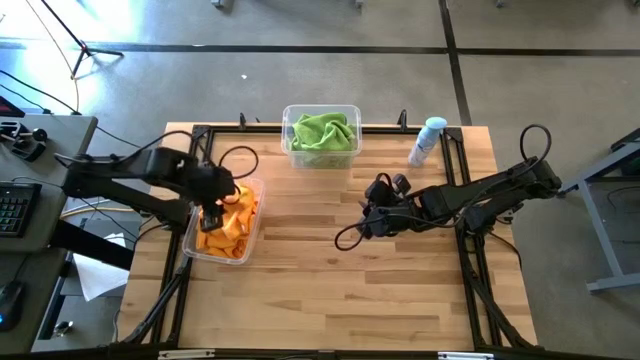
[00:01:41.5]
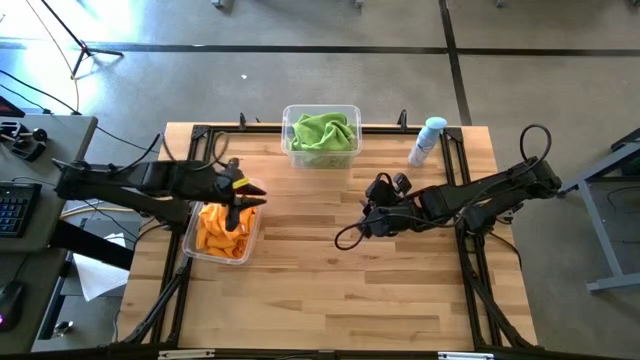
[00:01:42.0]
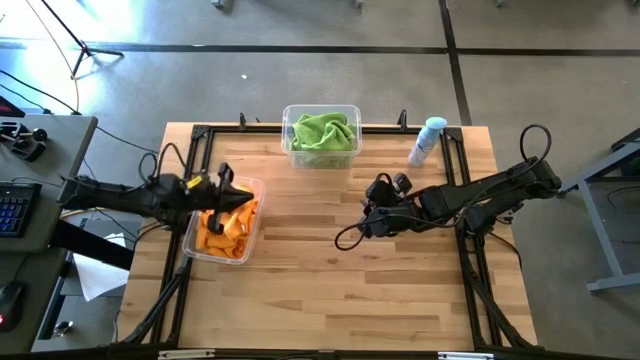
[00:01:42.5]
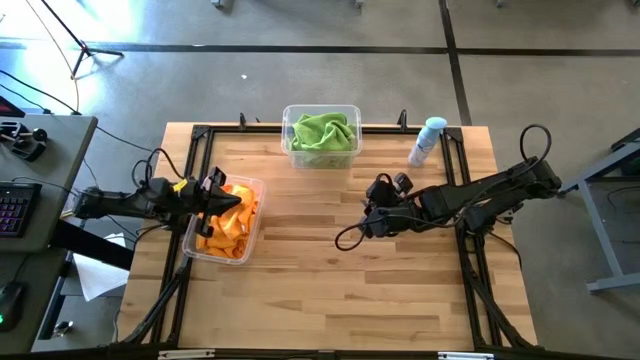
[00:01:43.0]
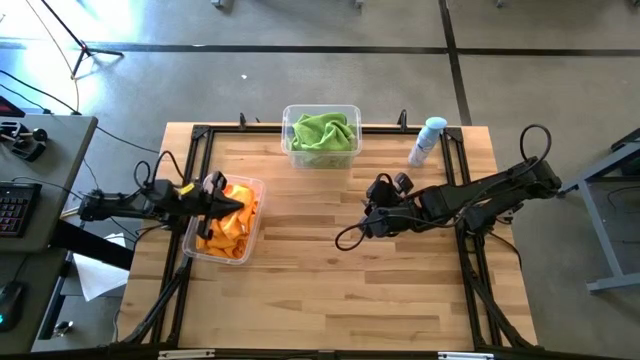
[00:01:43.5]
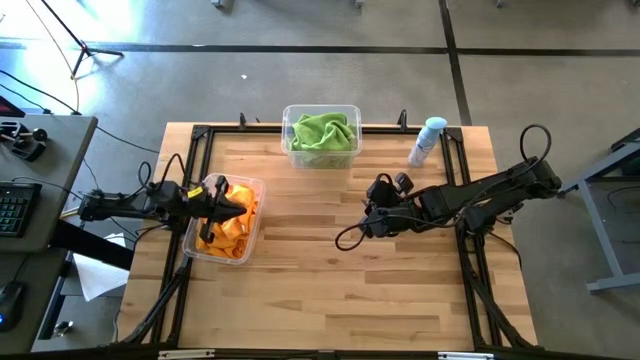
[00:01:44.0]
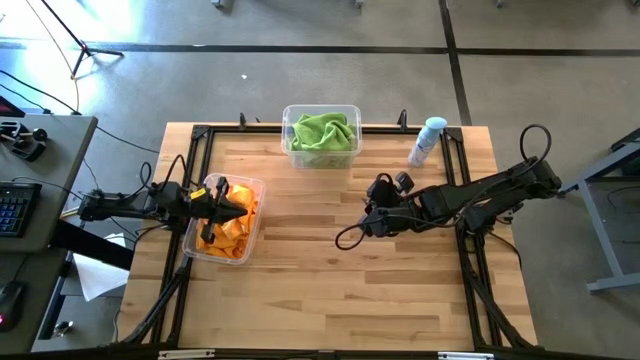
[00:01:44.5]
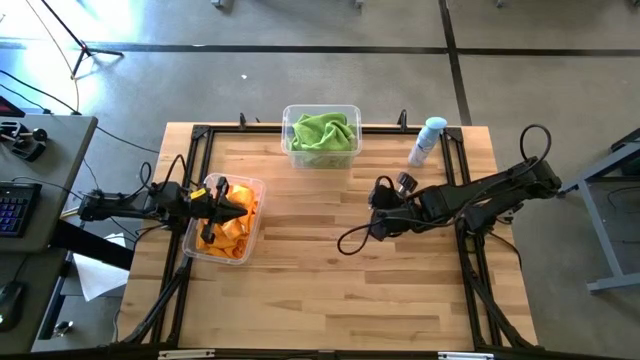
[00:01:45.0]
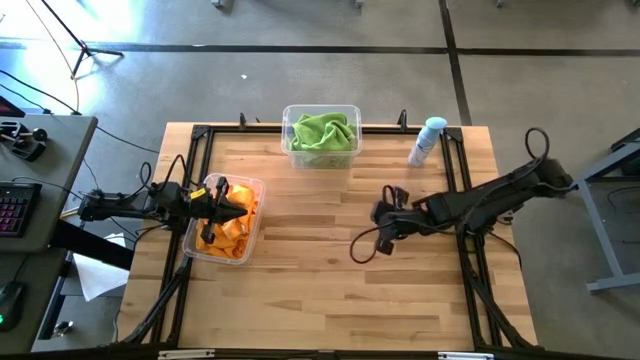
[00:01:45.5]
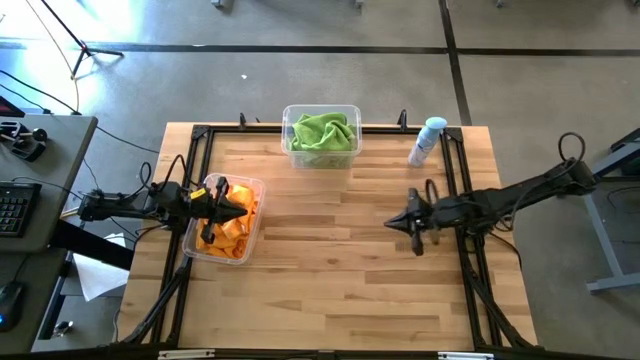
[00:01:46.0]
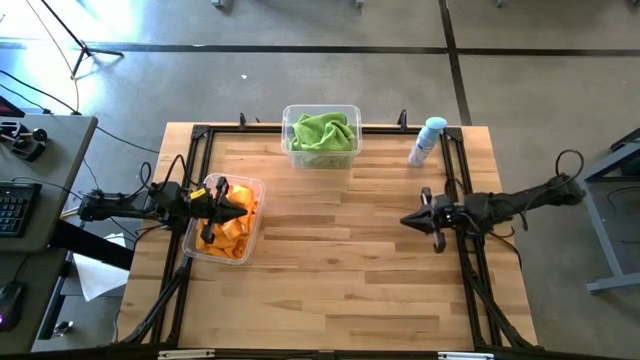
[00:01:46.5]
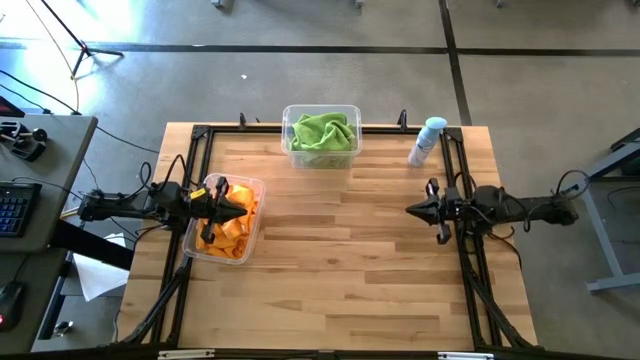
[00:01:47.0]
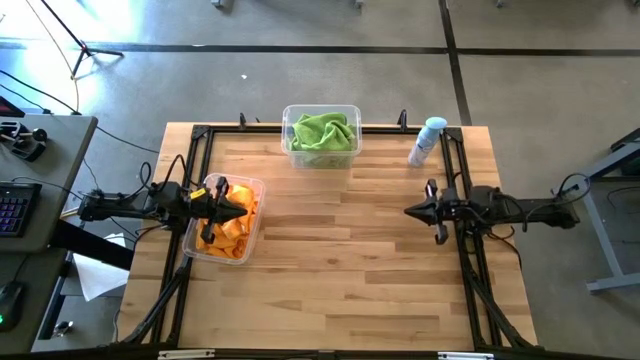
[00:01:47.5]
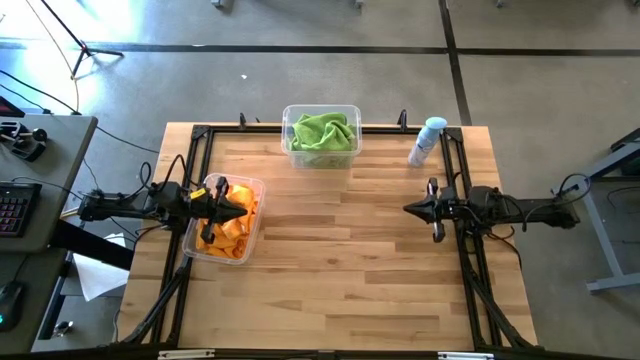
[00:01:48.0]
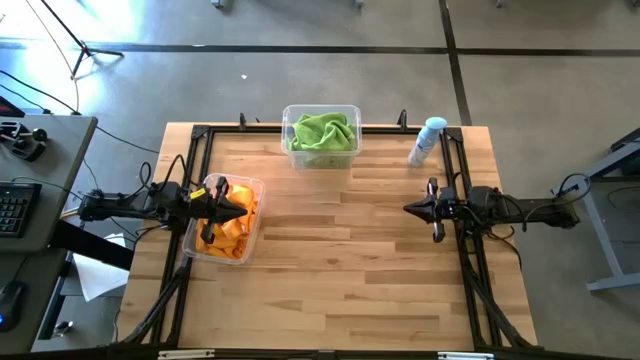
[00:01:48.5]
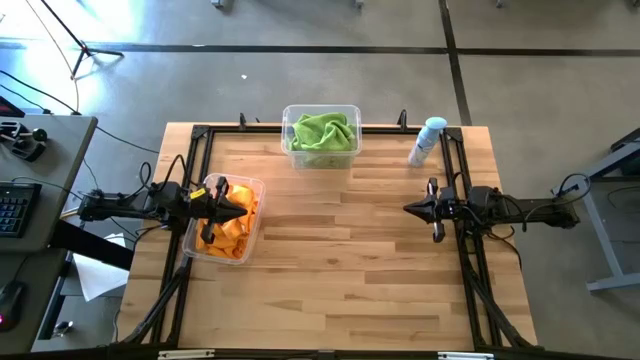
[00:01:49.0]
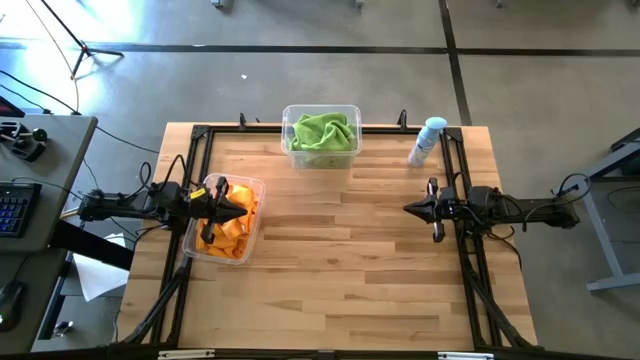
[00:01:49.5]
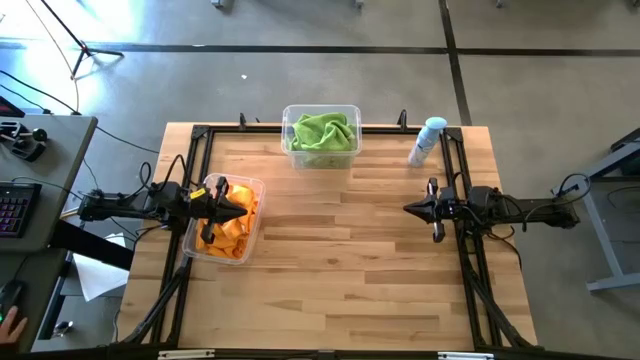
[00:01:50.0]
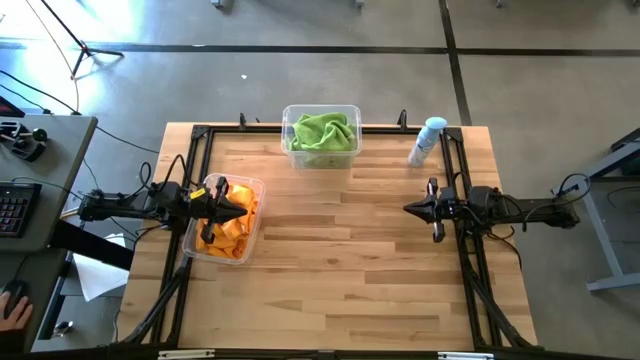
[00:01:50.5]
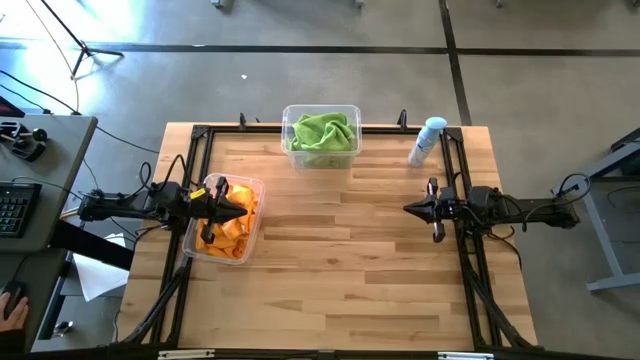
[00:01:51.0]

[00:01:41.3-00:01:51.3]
Task: Sort microfiber towel by color & place in baskets
Return to Home Position

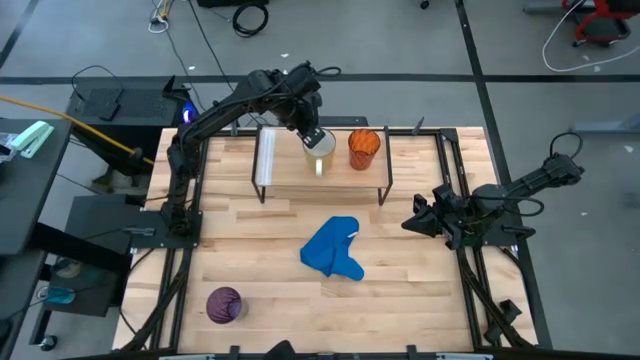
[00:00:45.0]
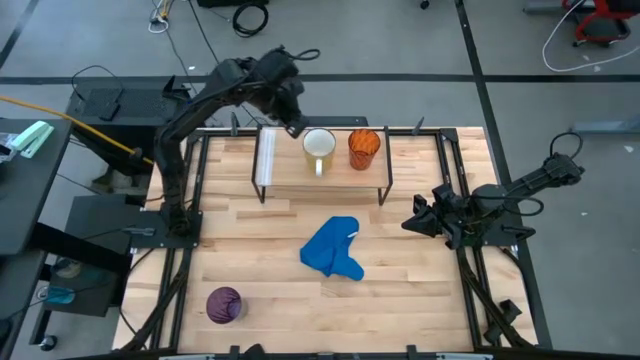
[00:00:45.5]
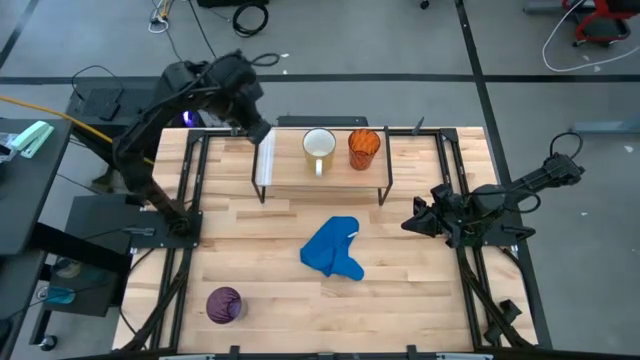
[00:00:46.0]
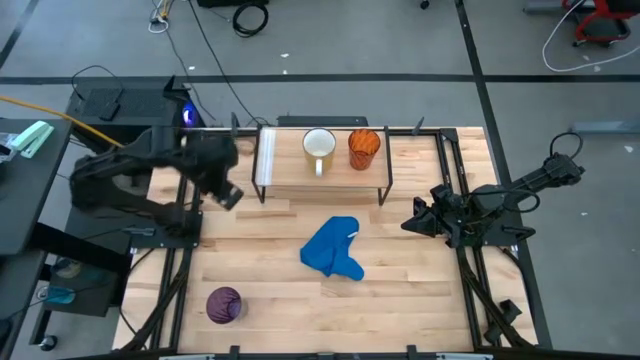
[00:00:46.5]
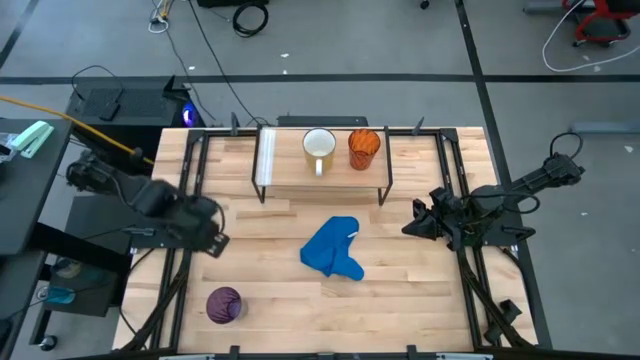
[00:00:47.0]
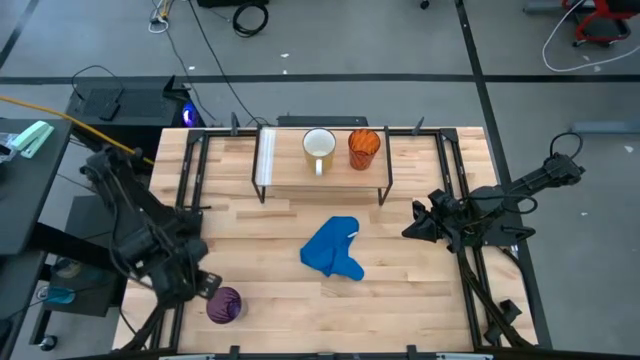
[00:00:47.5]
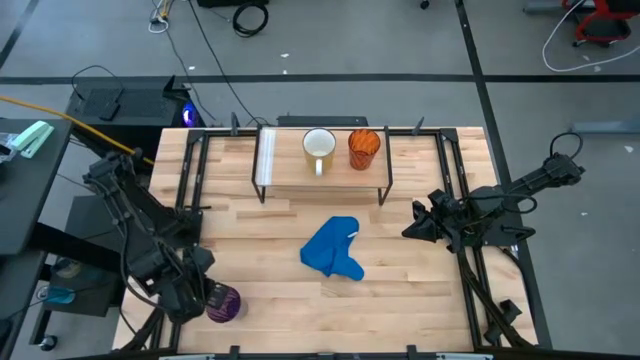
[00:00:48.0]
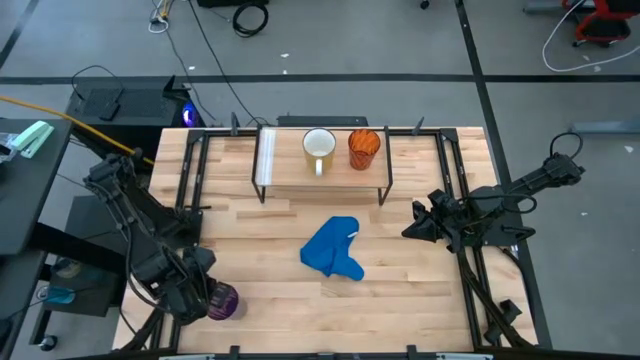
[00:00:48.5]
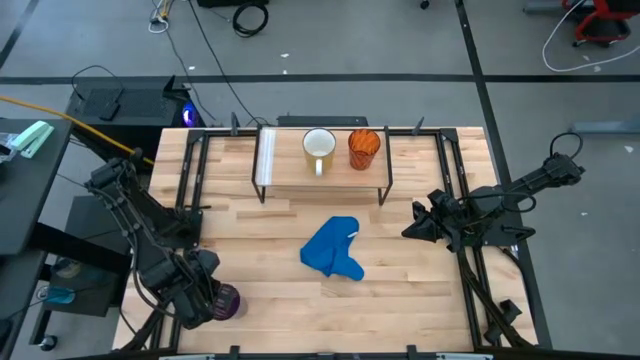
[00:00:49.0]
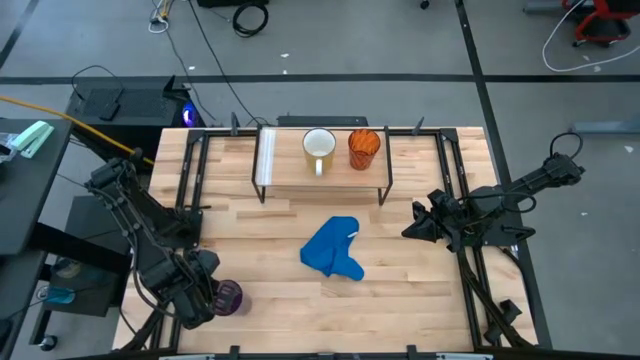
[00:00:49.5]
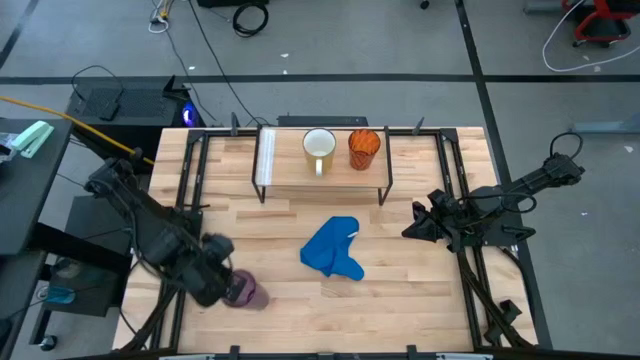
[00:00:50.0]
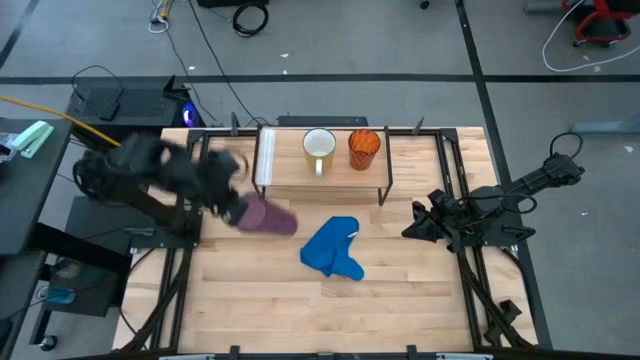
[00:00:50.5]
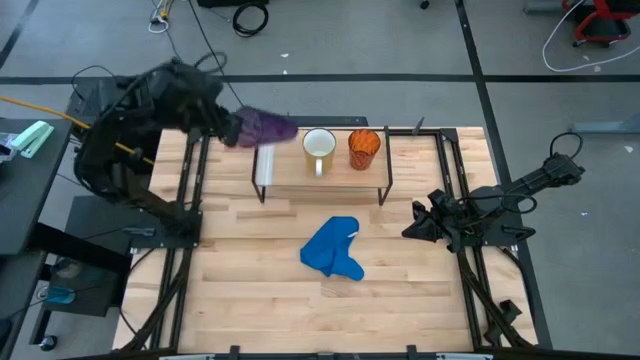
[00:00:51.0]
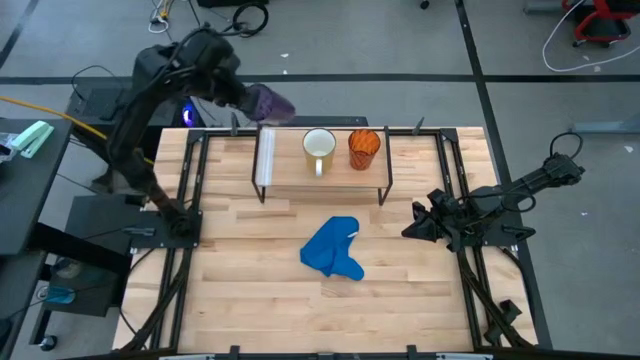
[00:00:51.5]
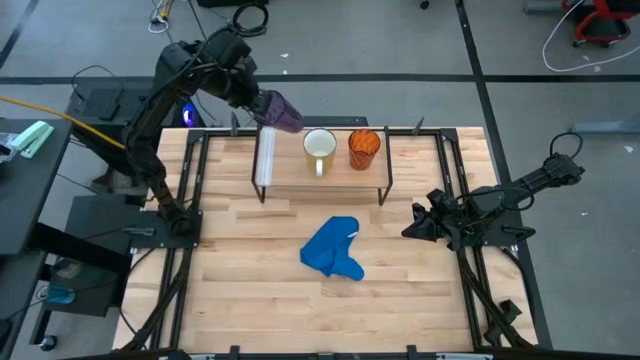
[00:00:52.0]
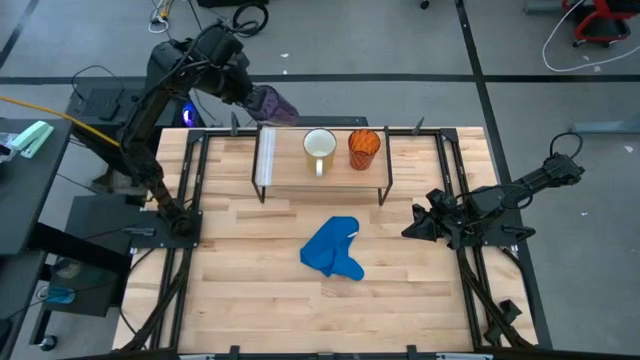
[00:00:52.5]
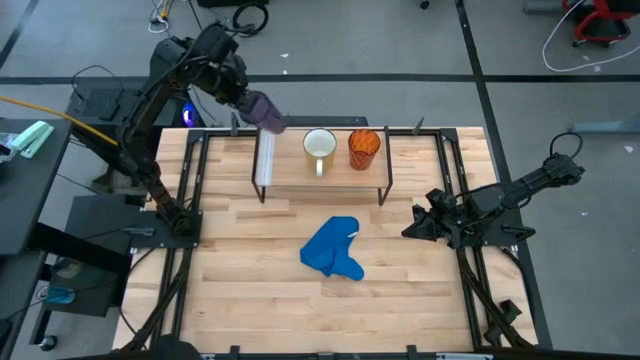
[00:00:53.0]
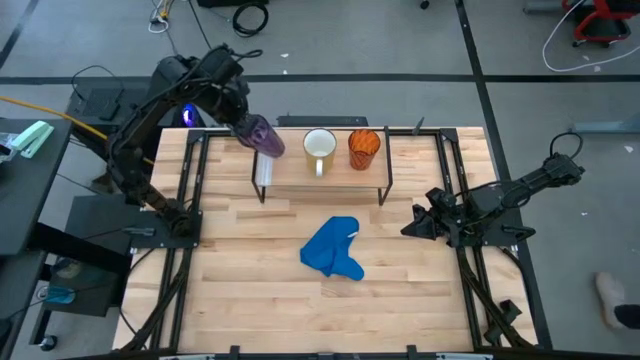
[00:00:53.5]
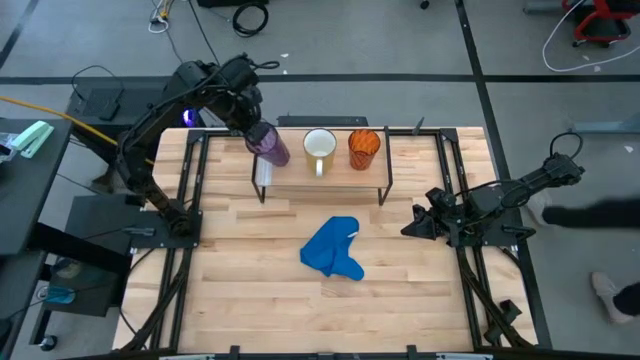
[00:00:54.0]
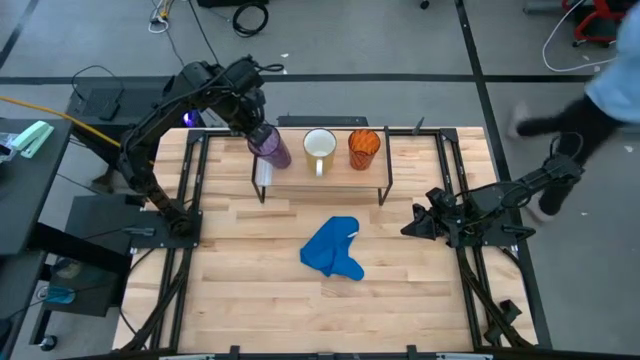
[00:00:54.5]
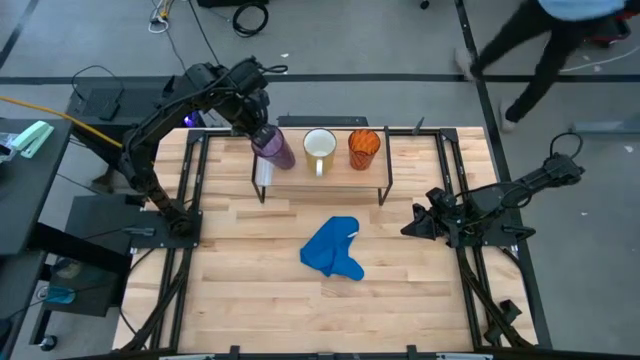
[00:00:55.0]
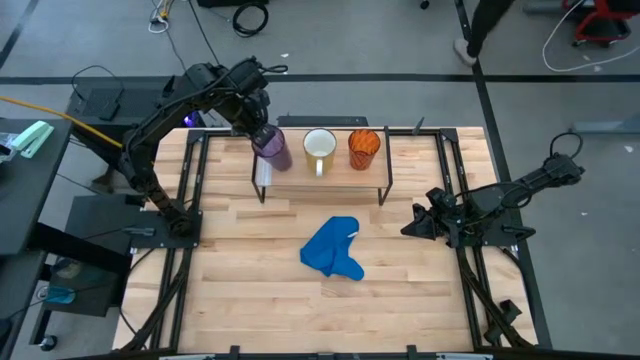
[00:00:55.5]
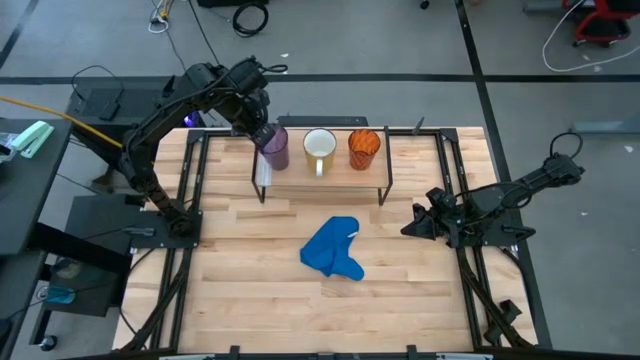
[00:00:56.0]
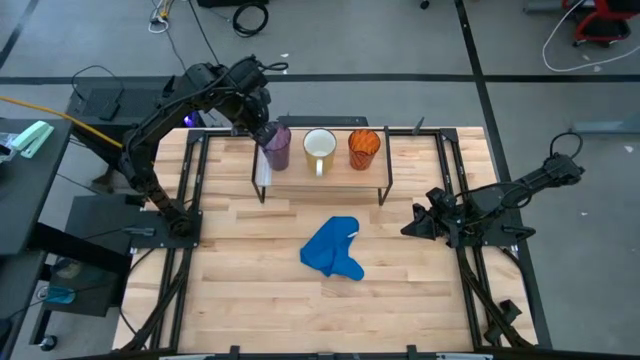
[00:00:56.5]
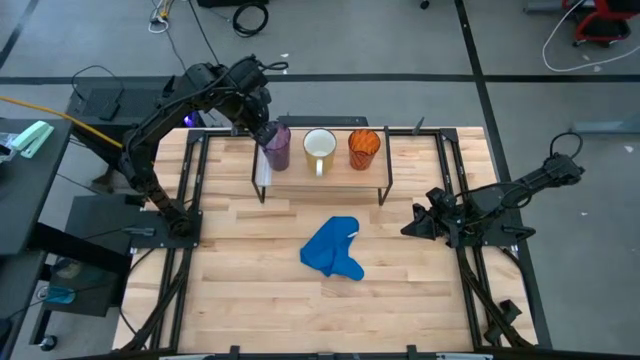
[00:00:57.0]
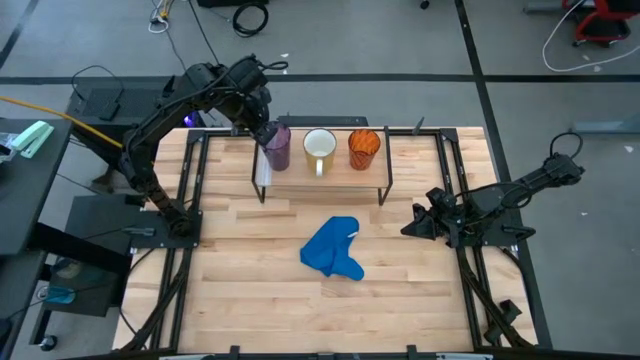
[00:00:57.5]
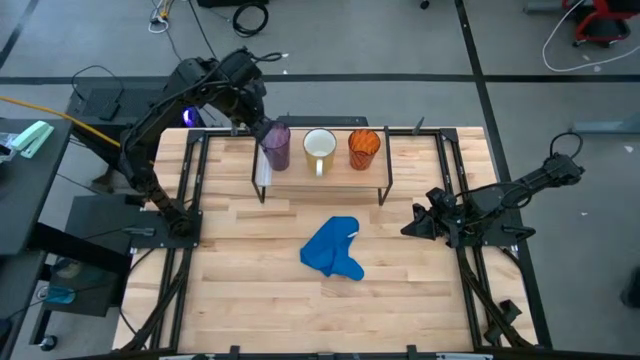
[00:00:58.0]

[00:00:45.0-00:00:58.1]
Task: Stack small to large cups/mugs on shelf
Put the violet cup on the shelf
